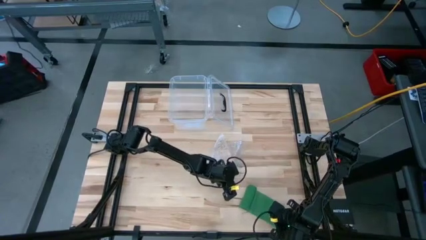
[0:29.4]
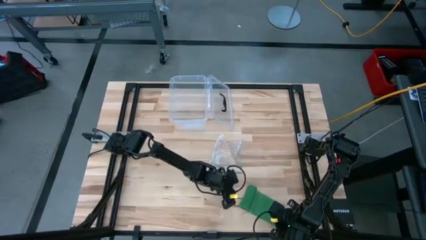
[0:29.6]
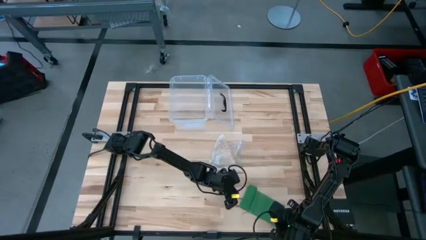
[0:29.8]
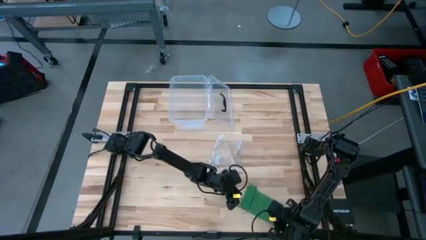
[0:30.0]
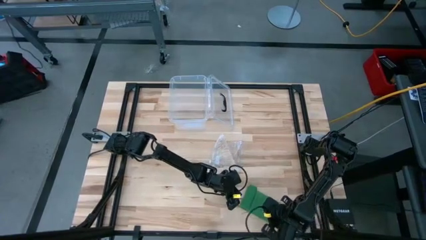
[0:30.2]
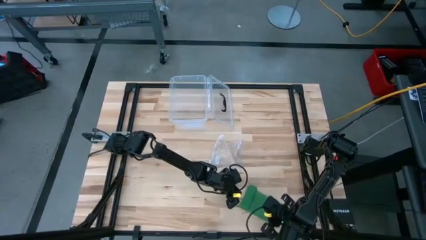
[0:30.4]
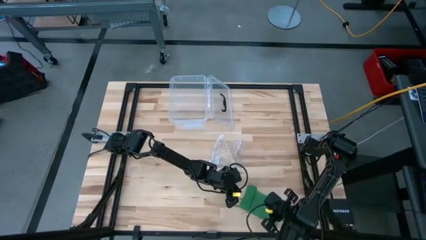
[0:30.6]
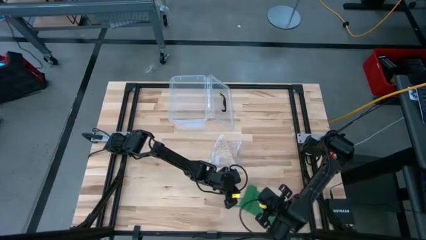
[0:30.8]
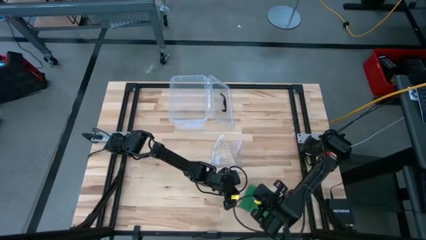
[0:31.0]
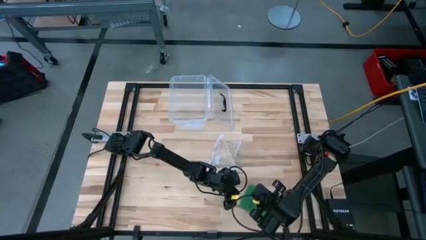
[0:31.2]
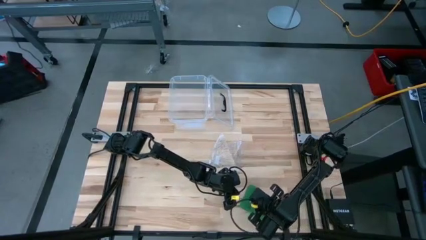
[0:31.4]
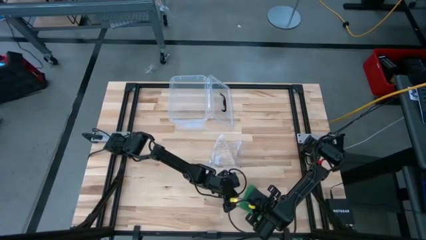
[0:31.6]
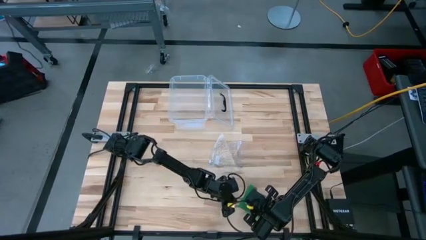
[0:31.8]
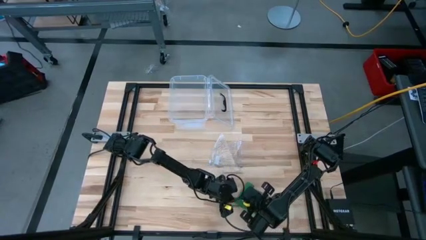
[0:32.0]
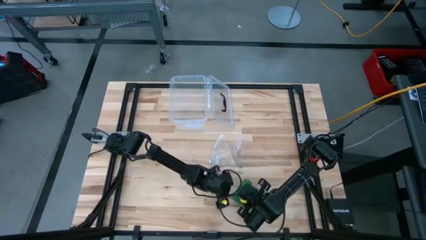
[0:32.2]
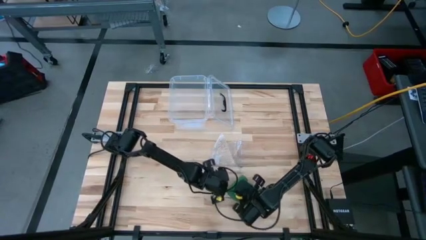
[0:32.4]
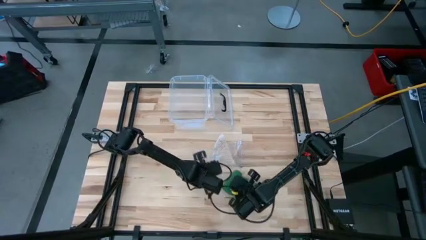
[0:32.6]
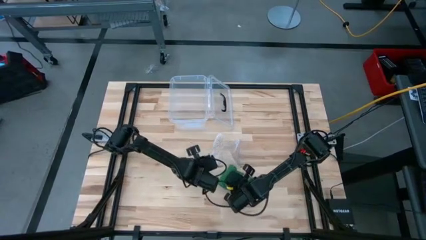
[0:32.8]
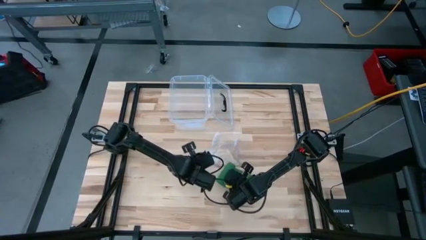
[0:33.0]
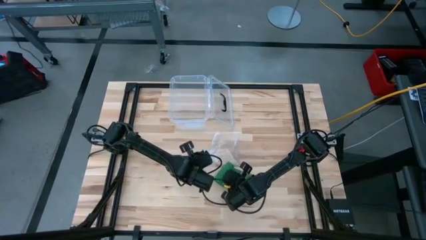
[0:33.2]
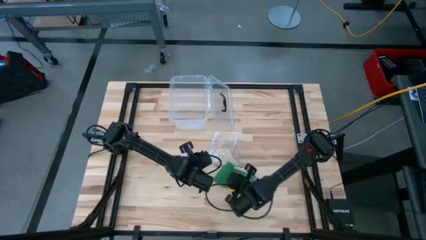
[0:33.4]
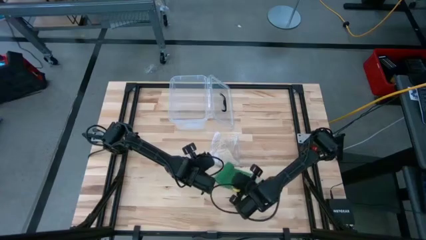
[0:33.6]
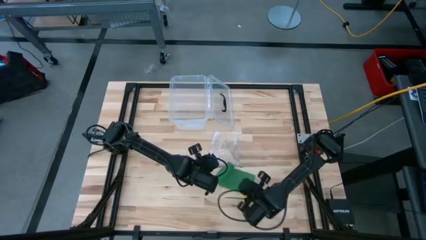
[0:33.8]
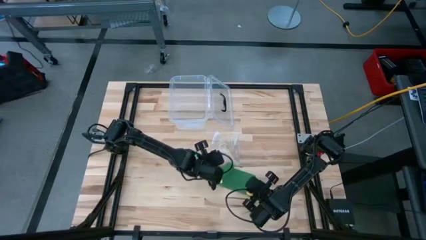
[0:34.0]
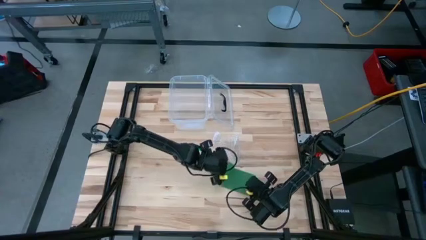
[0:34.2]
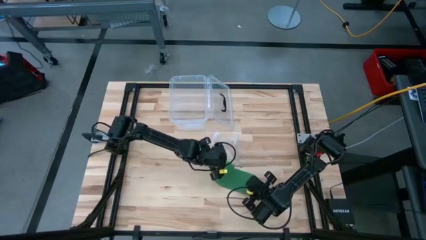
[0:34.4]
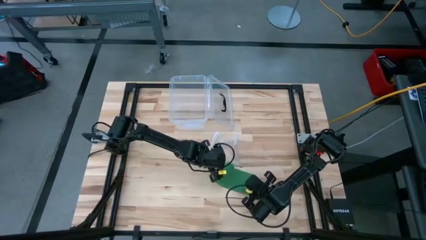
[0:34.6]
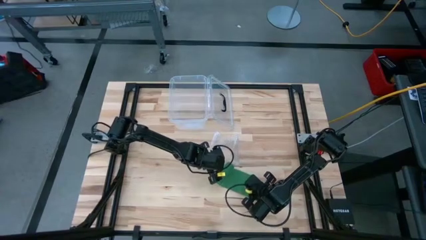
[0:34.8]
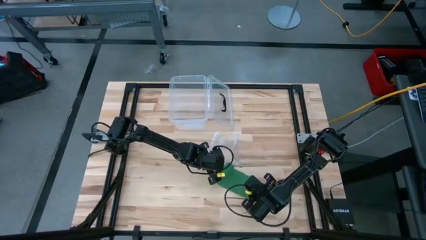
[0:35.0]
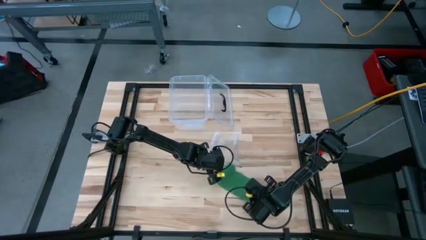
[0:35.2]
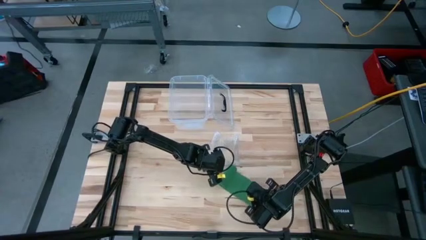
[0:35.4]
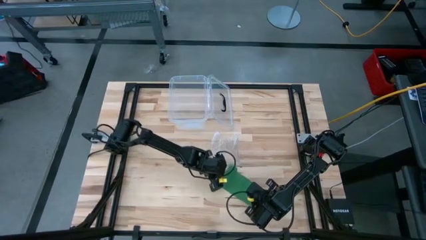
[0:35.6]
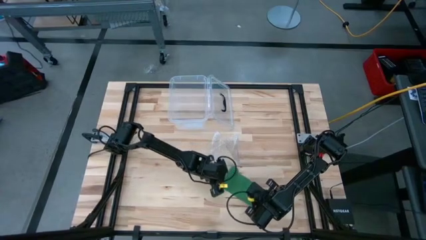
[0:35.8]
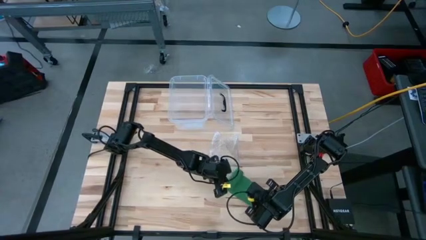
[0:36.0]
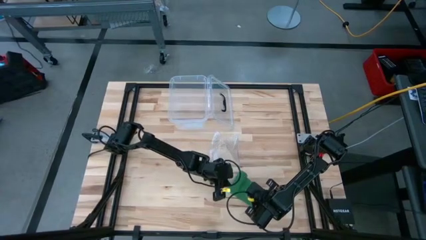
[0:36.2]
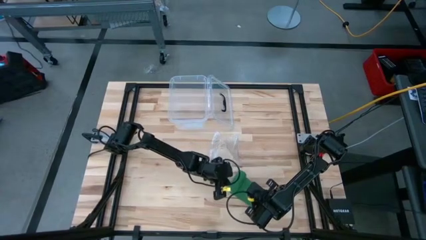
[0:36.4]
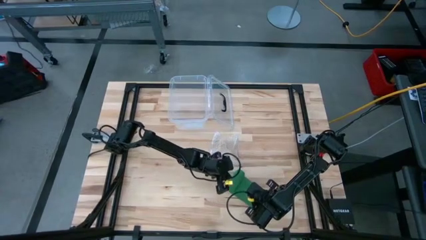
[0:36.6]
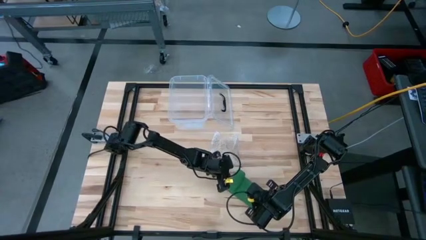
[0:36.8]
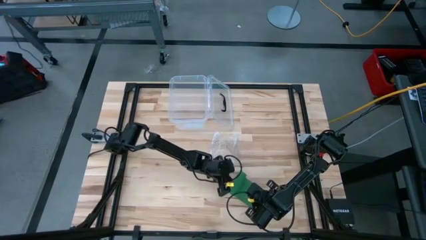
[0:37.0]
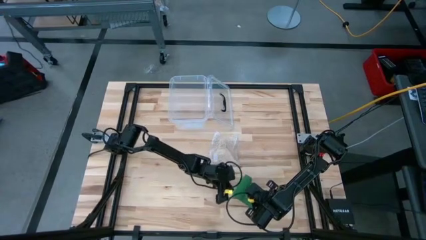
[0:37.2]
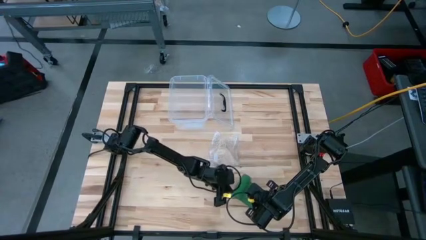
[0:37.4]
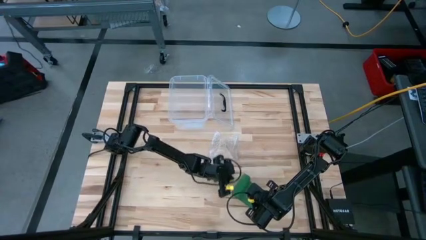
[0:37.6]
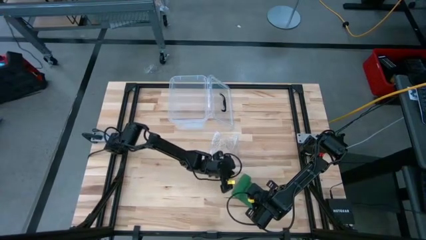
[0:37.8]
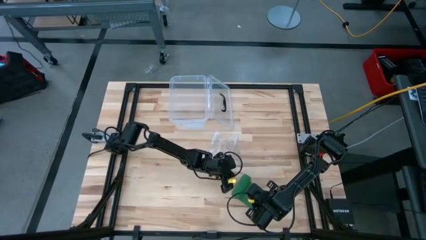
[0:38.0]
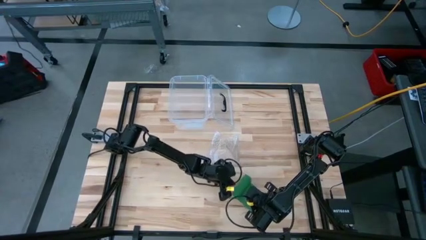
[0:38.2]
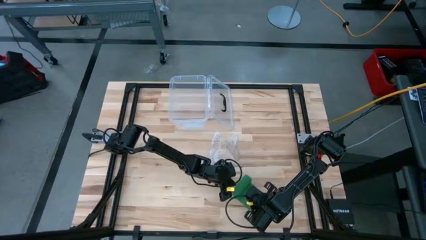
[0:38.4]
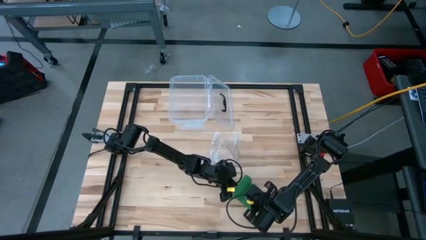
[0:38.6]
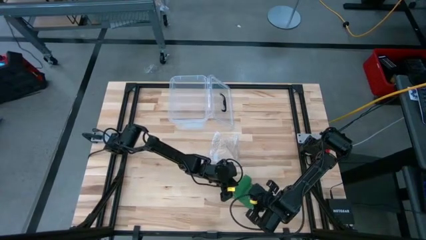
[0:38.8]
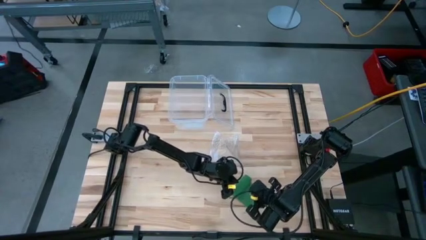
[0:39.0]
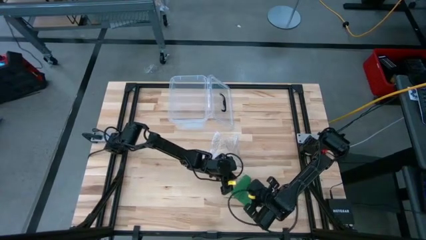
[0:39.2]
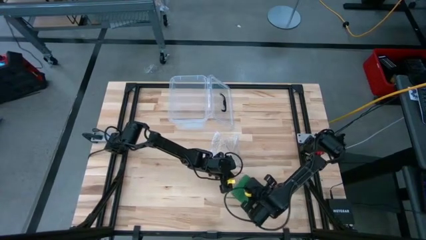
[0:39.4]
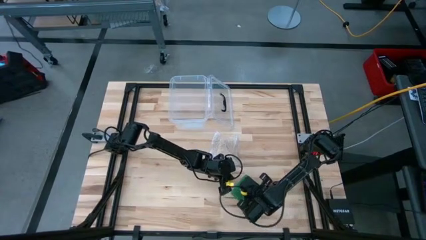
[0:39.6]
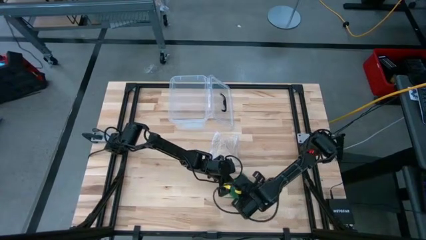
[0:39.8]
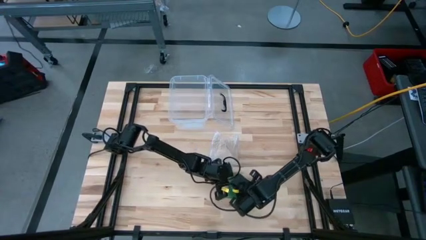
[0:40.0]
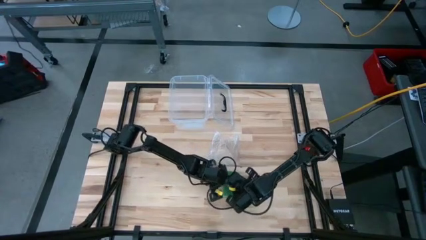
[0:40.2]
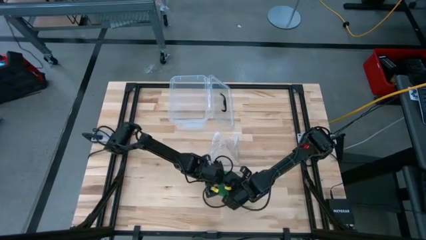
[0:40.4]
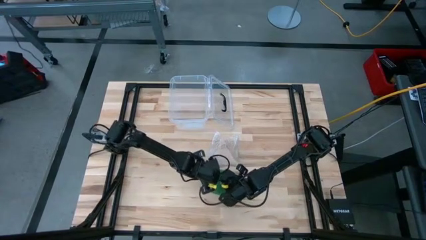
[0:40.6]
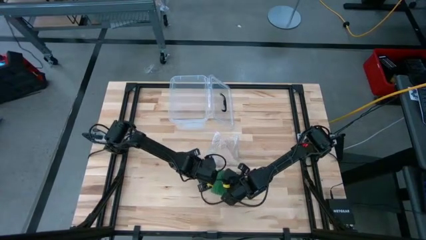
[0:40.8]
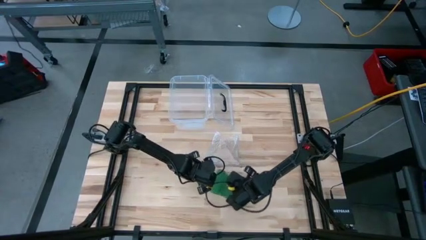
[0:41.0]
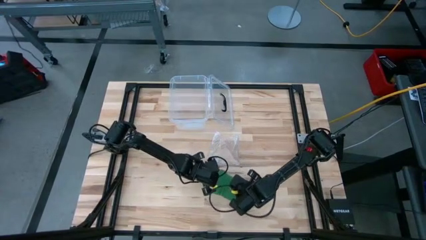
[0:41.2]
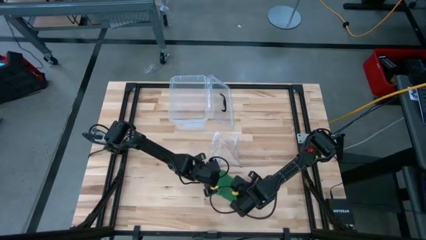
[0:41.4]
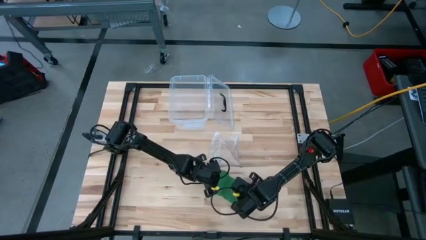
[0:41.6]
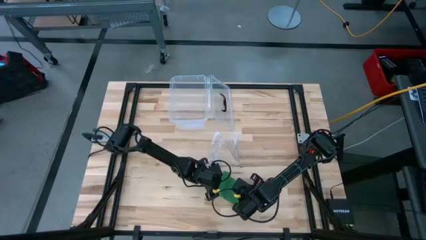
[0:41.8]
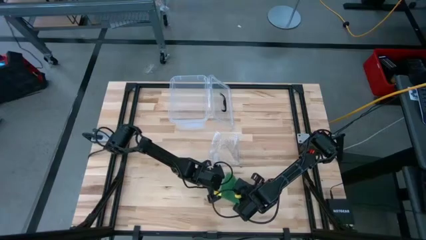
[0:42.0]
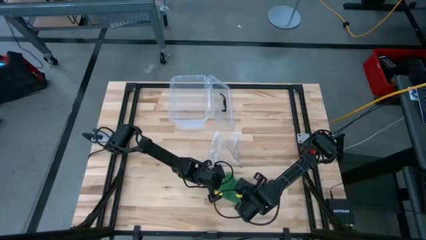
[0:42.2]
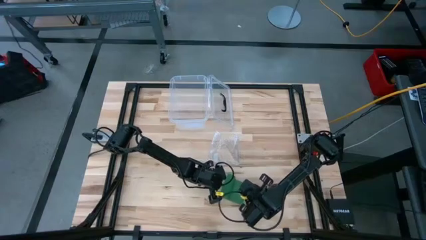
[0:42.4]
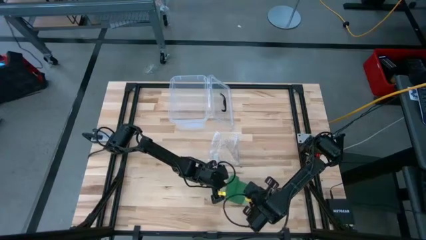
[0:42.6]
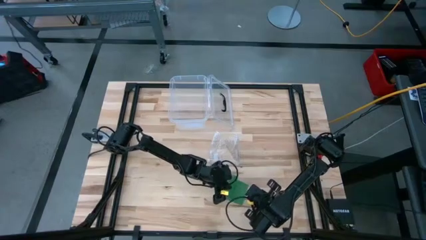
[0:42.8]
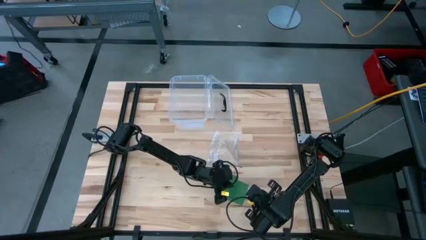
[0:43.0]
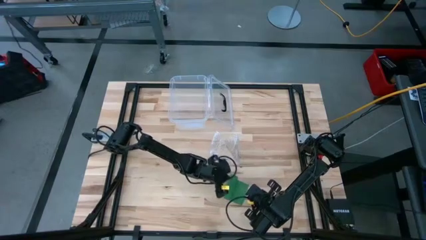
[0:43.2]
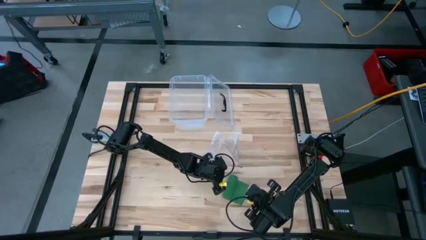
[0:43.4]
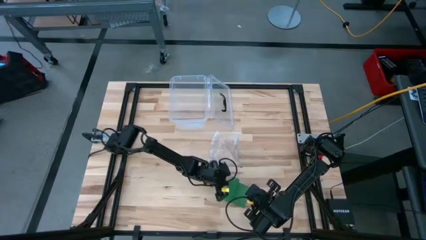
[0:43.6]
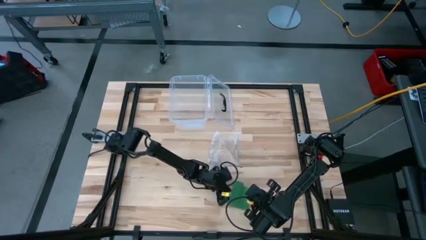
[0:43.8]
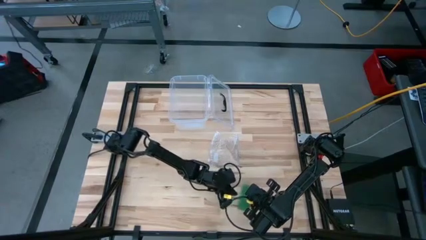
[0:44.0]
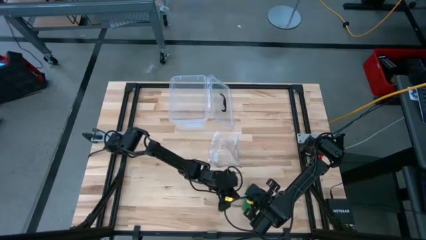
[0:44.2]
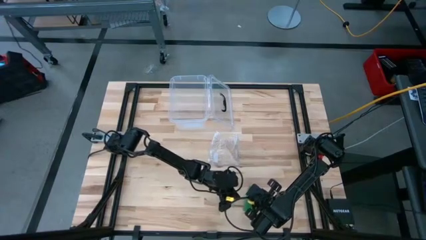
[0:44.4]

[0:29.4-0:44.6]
Task: Roll bandage
Roll the green bandage

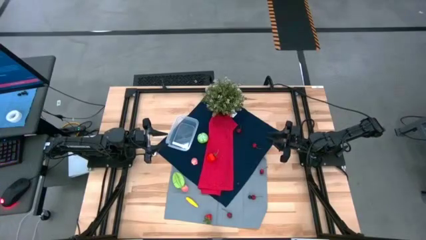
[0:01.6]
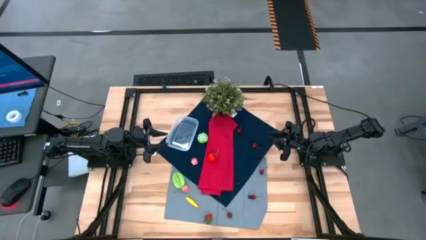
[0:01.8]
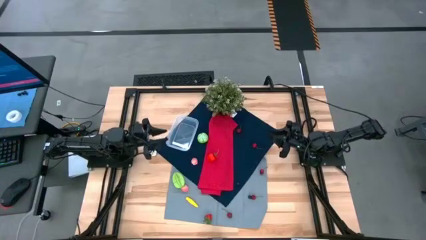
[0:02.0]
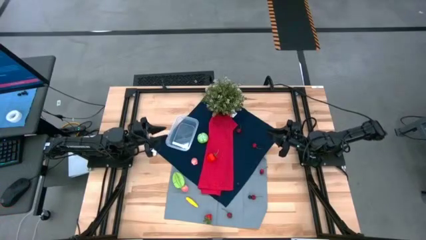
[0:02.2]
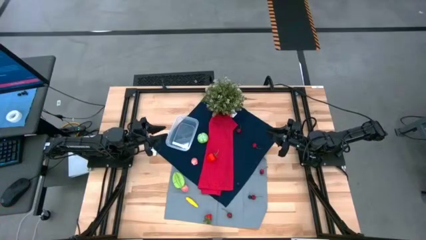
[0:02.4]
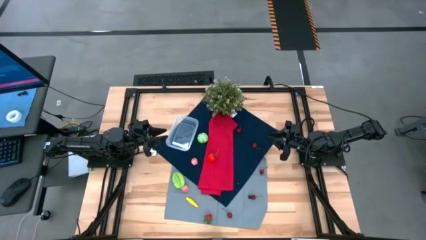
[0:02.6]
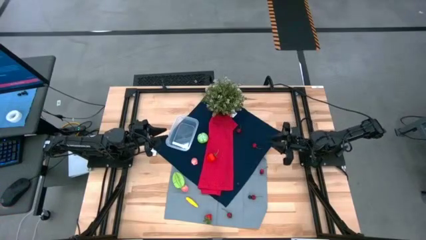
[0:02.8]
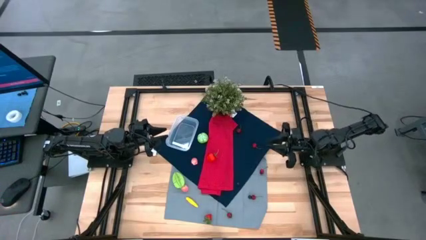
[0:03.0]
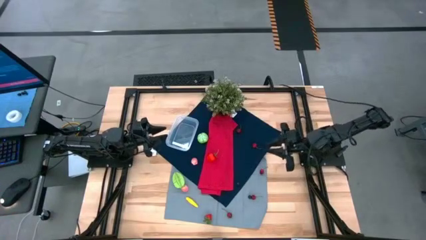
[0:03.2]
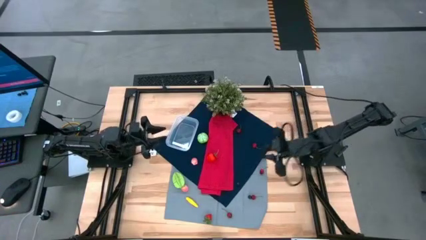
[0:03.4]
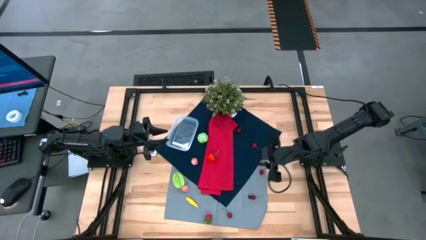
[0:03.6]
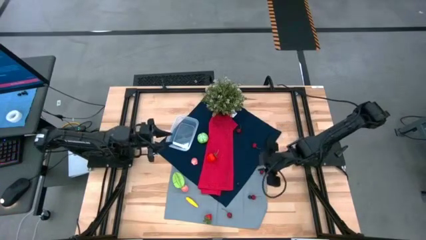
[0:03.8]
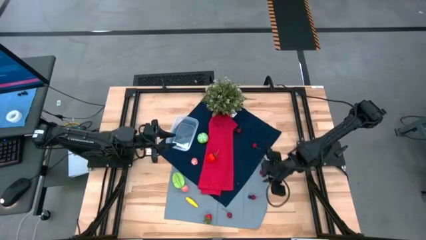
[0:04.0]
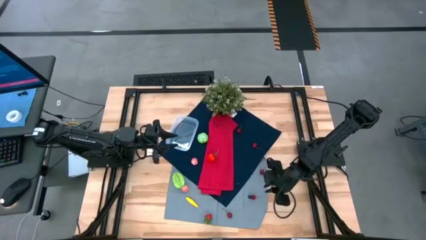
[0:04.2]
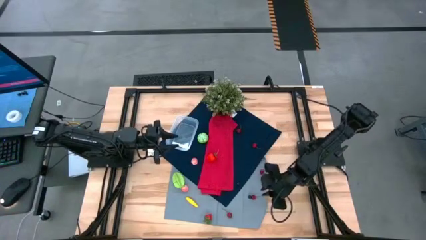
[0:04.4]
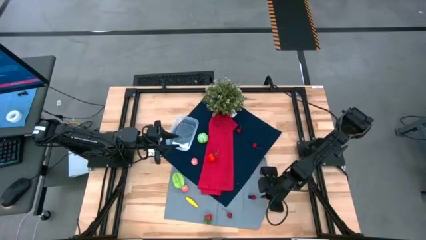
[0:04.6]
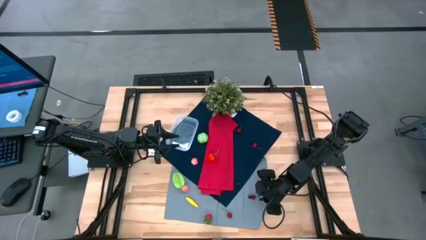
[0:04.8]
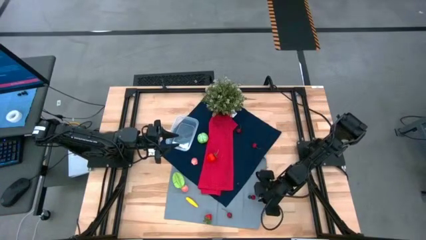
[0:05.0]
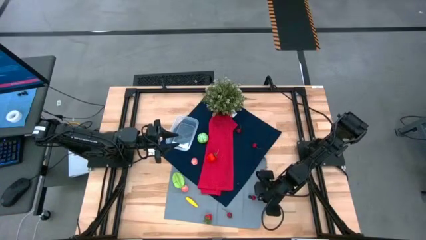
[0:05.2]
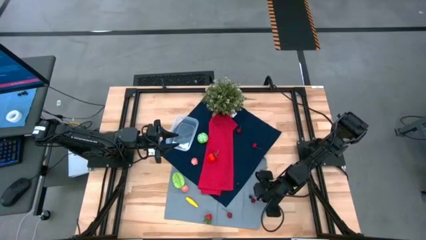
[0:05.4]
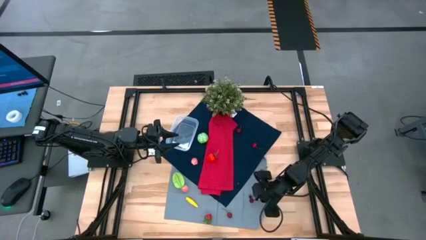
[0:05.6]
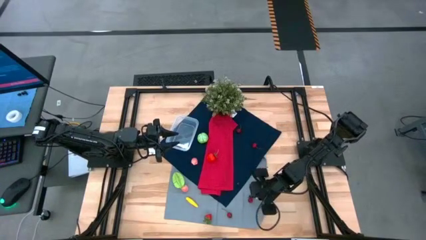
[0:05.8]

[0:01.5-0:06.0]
Task: Pick and placing Produce into tupperware
Put the red cherry into the transparent bin
